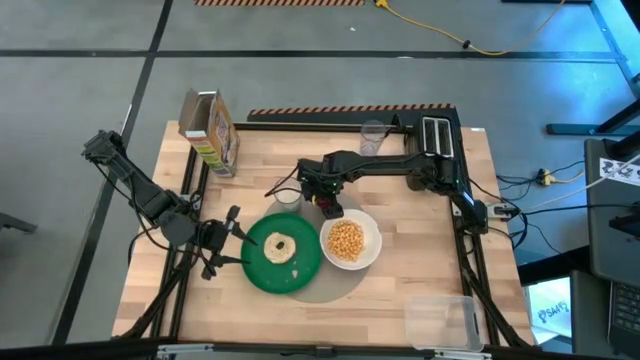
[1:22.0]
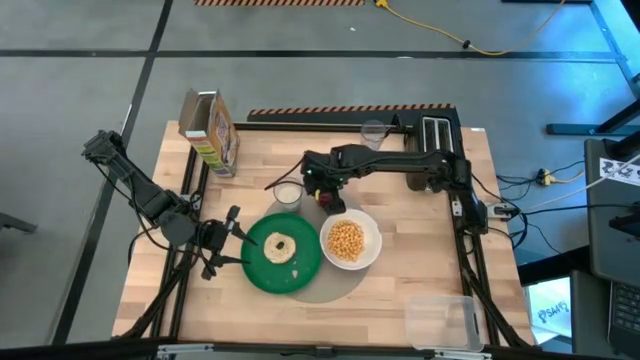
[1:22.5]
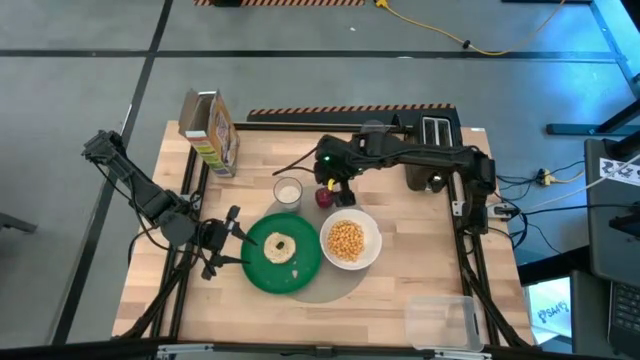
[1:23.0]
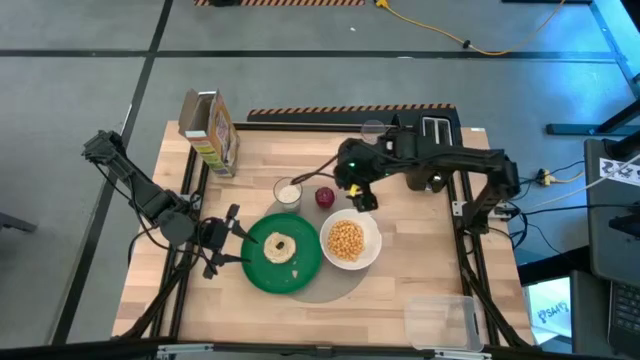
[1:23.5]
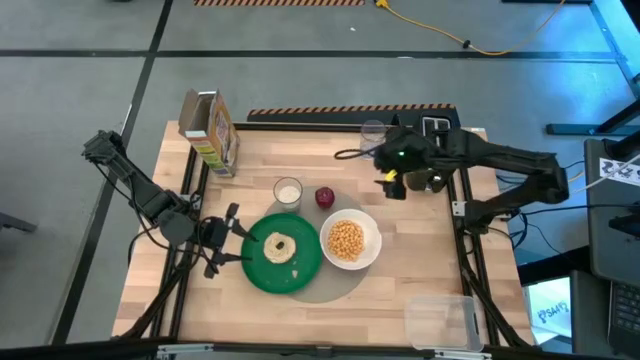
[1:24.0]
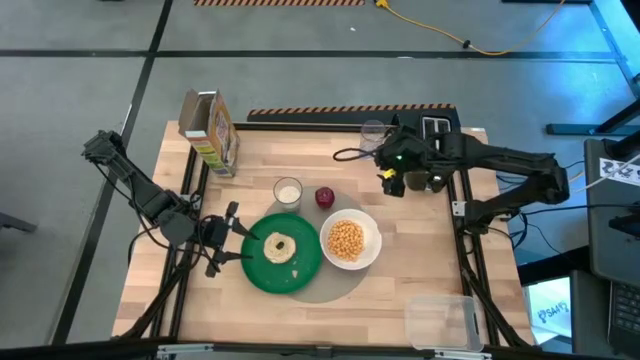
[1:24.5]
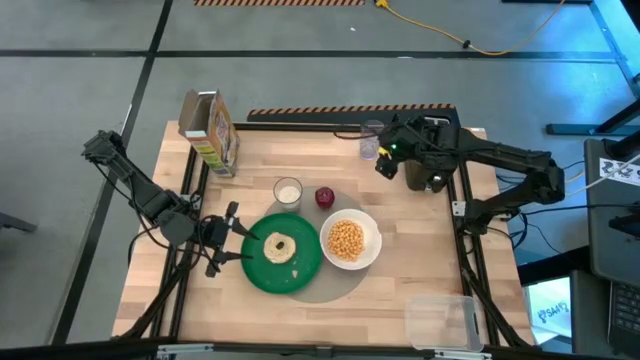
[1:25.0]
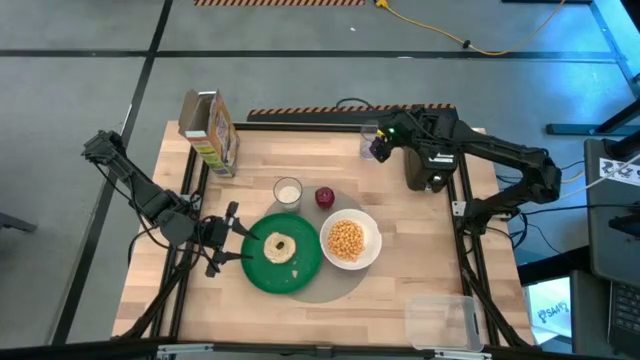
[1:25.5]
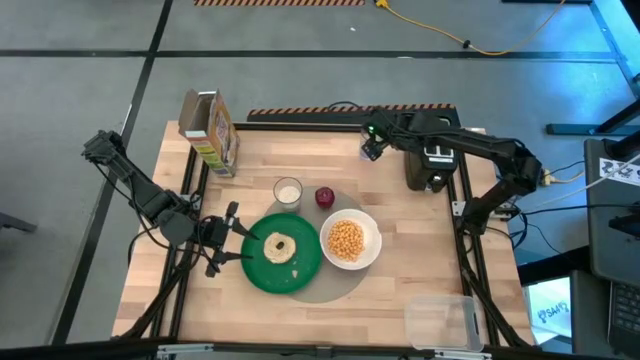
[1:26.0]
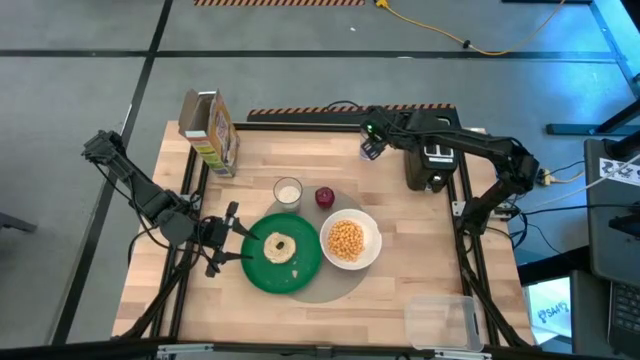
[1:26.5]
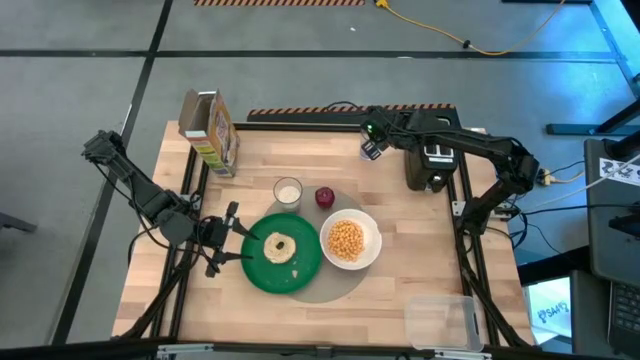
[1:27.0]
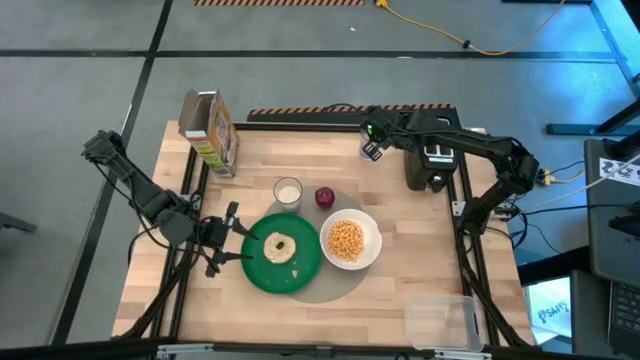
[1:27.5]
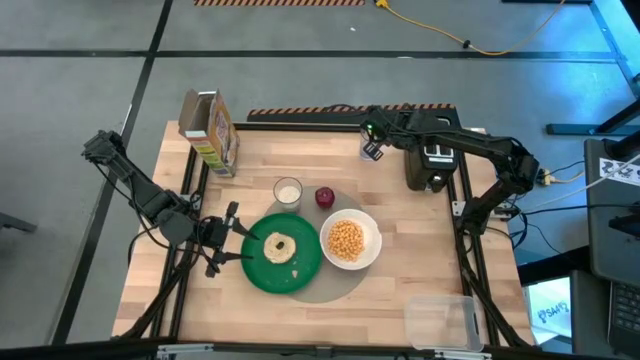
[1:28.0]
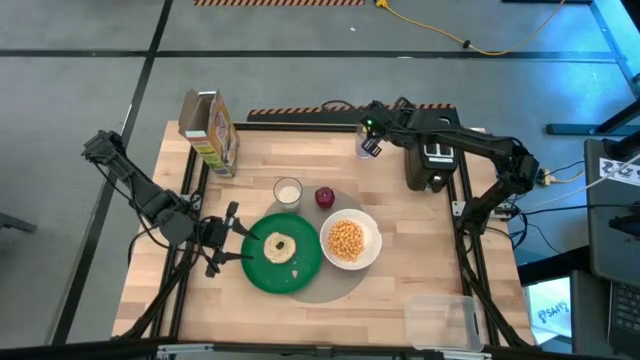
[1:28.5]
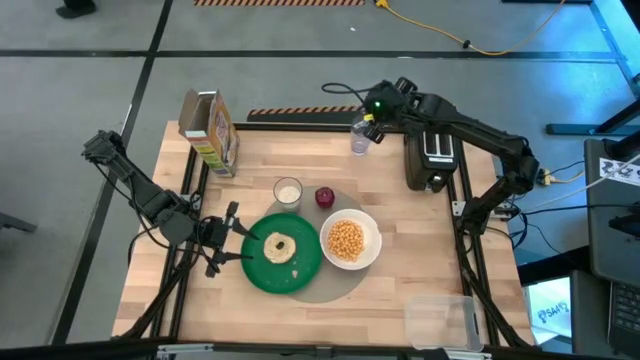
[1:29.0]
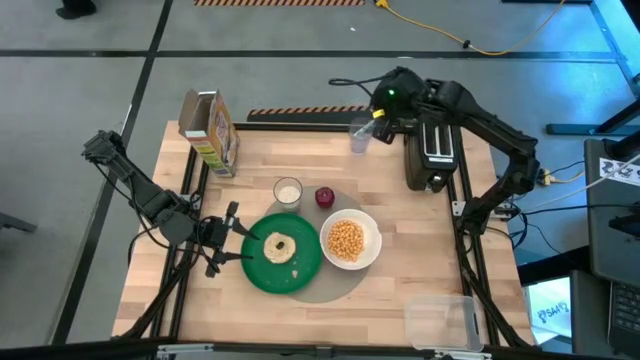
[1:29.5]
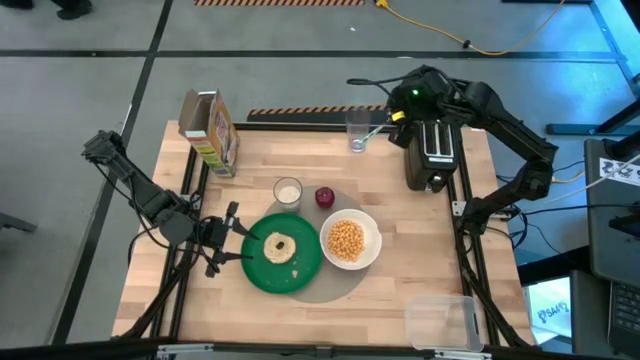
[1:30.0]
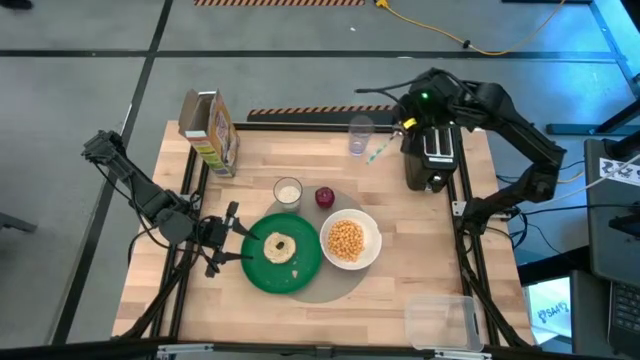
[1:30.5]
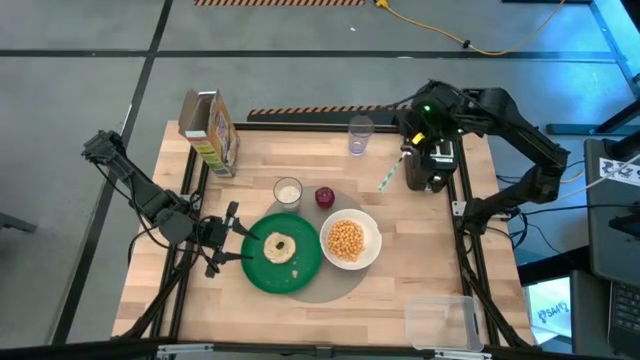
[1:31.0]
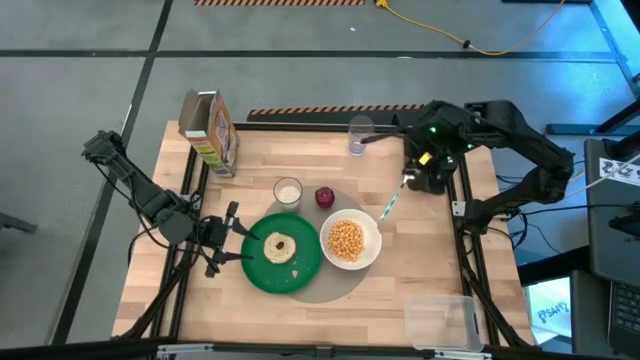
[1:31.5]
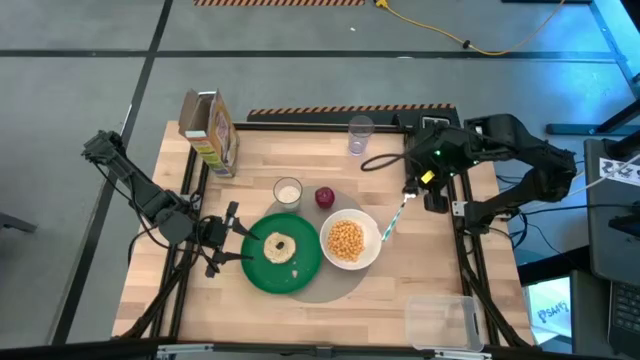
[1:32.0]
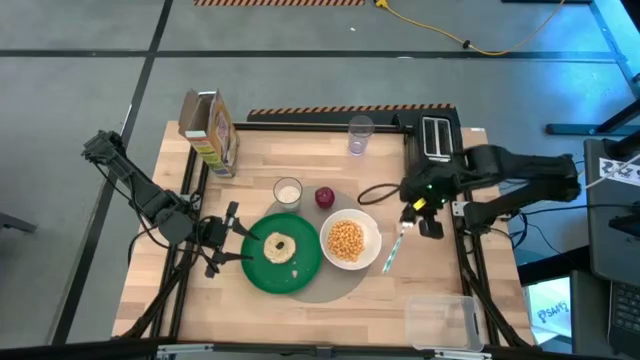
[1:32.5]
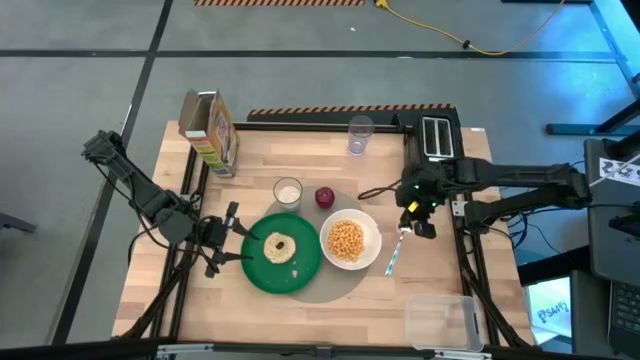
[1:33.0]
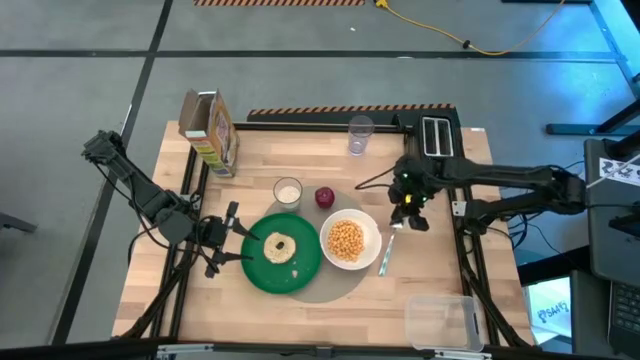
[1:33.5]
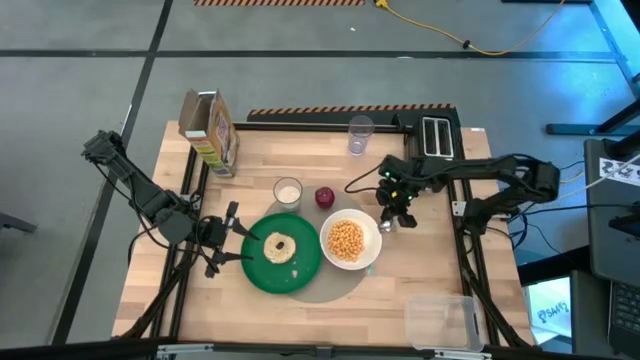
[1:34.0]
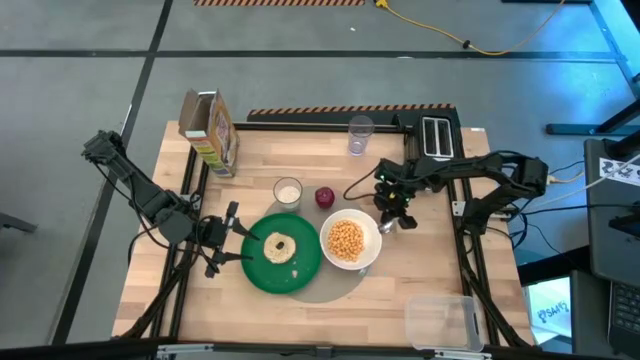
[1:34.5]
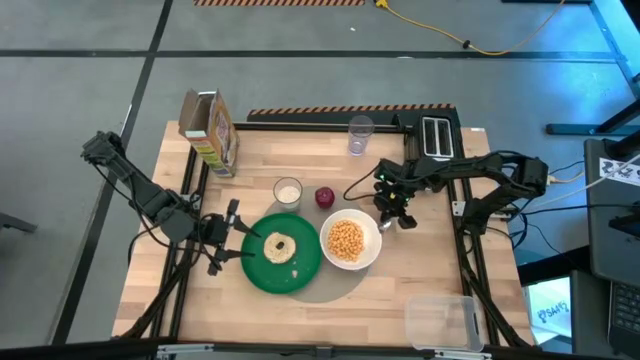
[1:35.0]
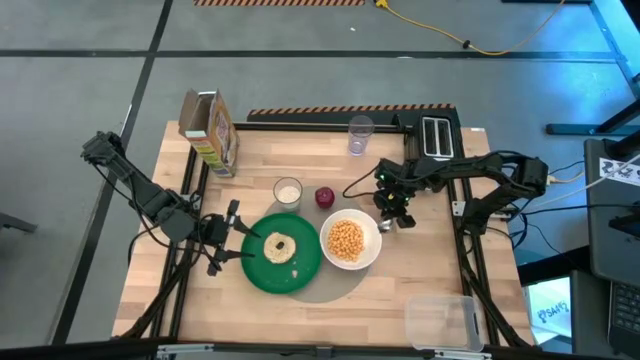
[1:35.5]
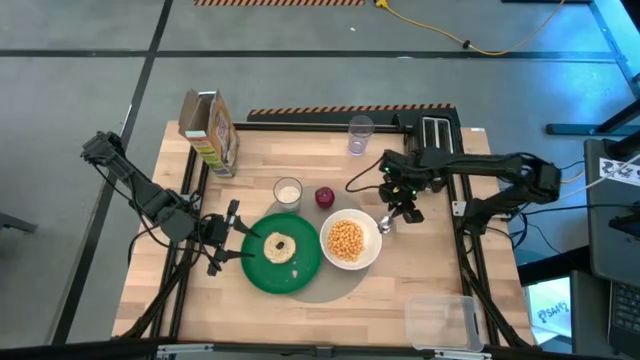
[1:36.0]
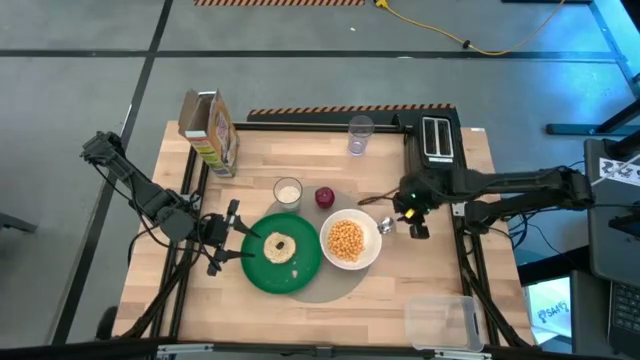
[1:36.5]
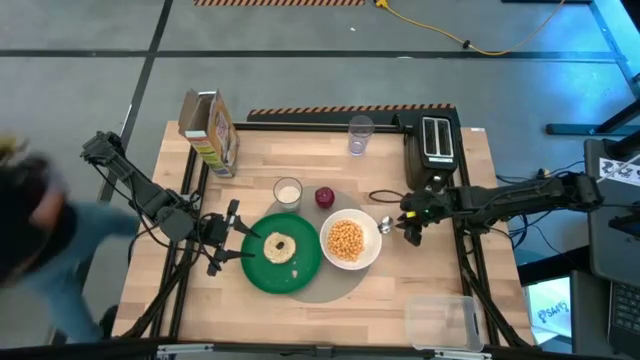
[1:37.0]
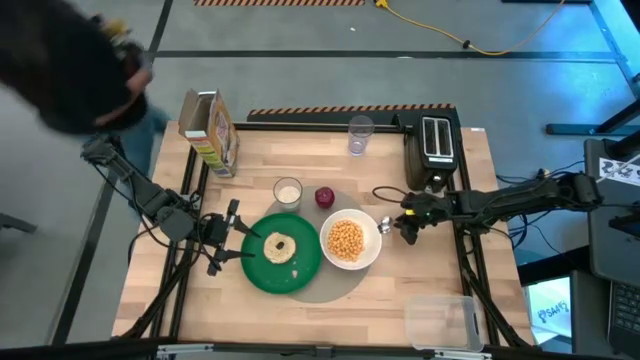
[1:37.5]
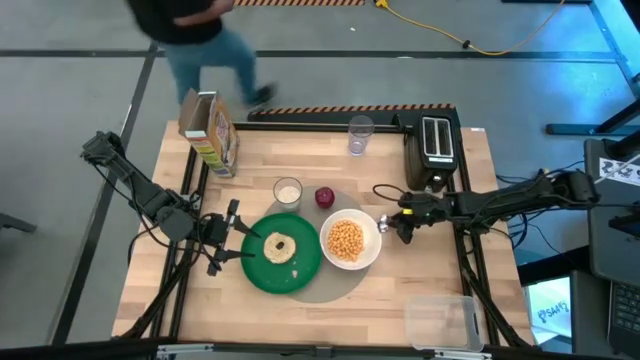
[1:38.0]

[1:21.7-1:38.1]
Task: Arrange a breakfast setting
Put the blue patterned spoon to the right of the white bowl

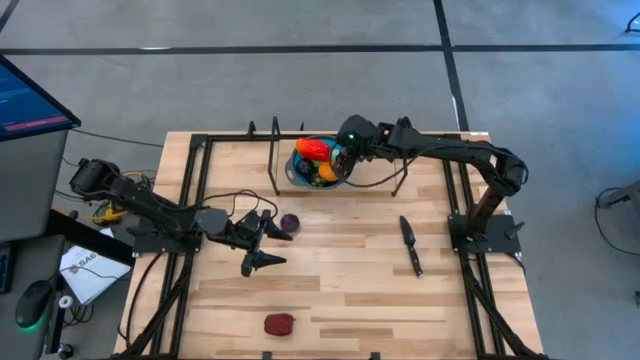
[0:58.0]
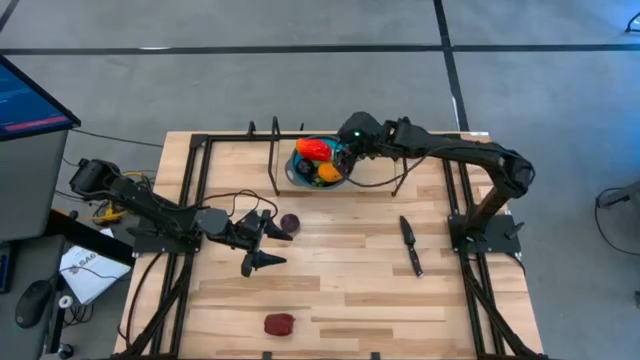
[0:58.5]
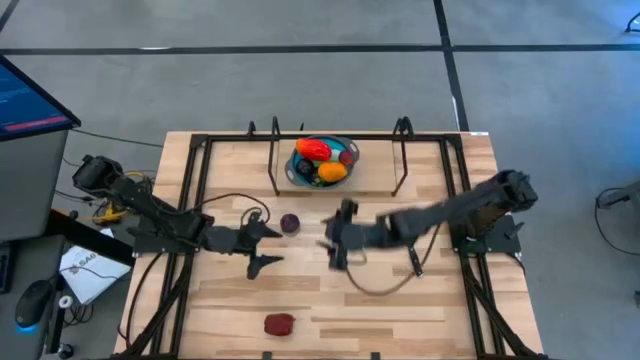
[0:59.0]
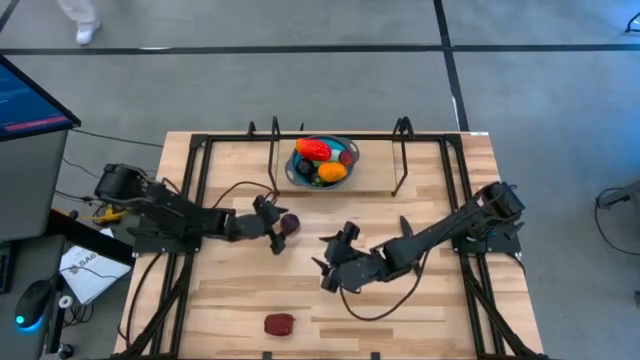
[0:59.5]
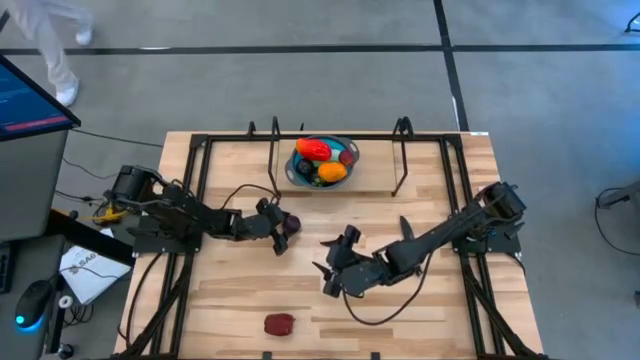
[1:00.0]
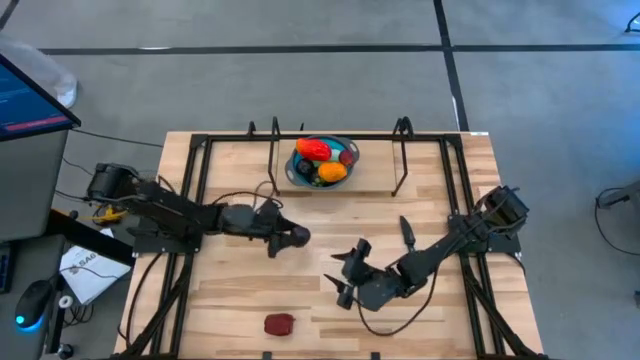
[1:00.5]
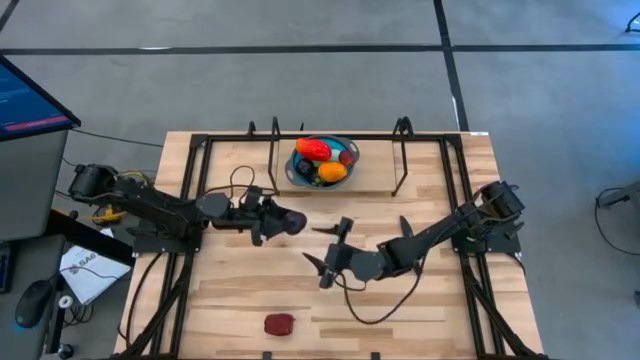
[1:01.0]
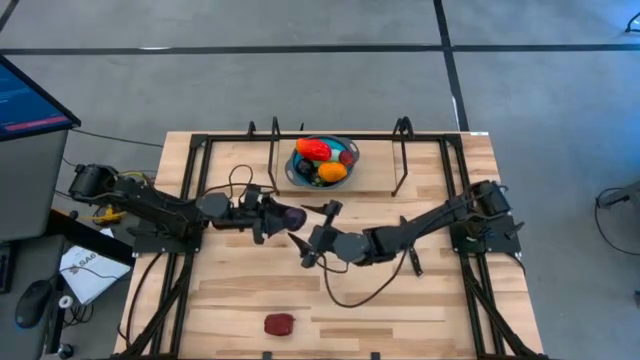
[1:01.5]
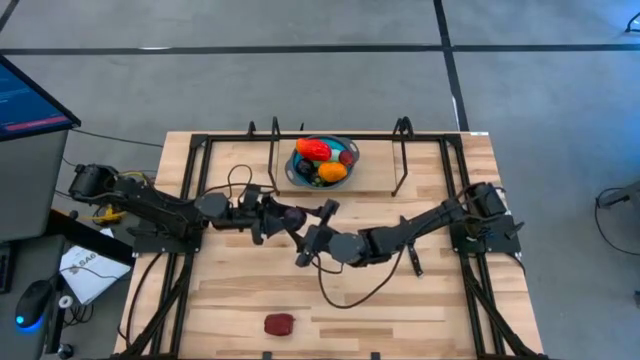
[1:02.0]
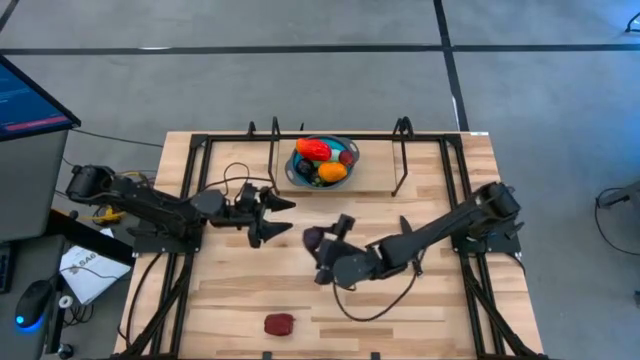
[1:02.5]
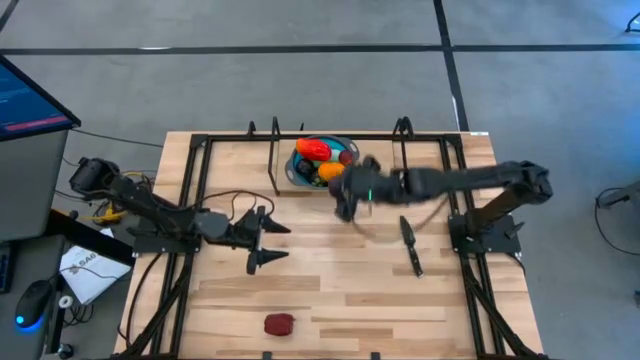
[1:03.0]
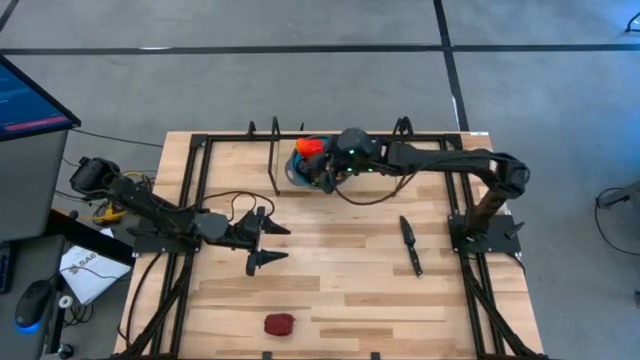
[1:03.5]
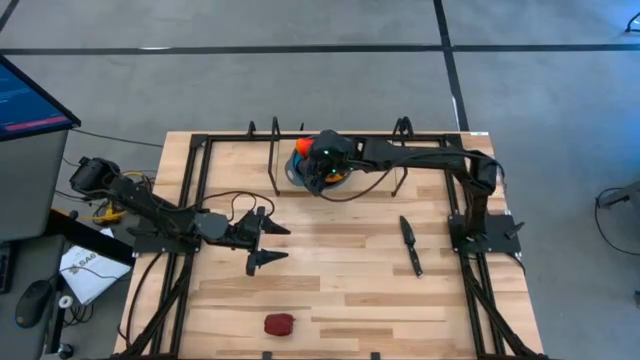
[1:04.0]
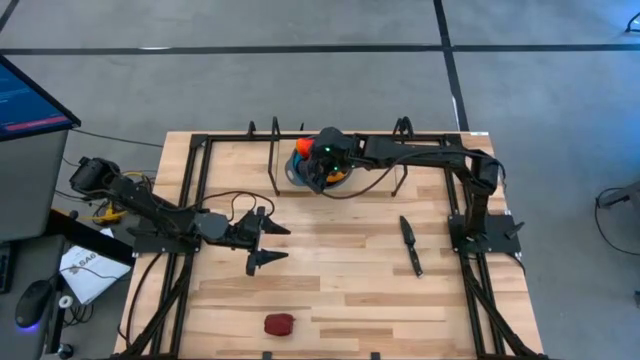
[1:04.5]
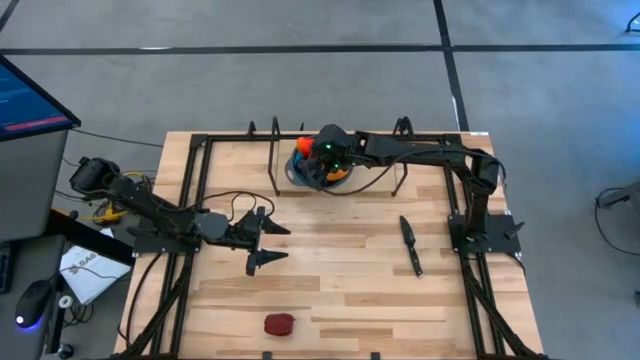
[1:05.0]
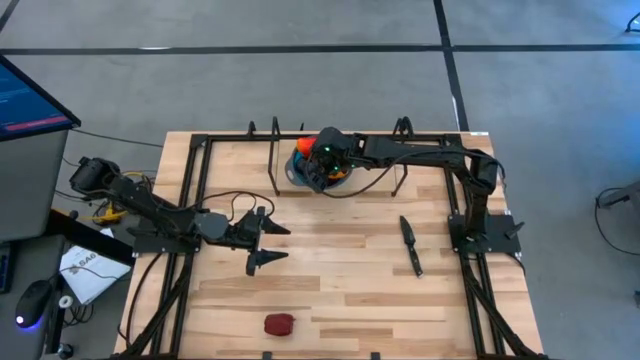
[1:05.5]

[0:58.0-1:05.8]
Task: Pick & Place Fruit
Put the purple plum into the blue strainer bowl on the shelf
